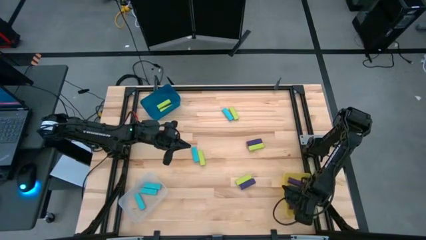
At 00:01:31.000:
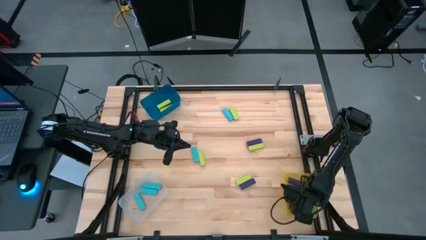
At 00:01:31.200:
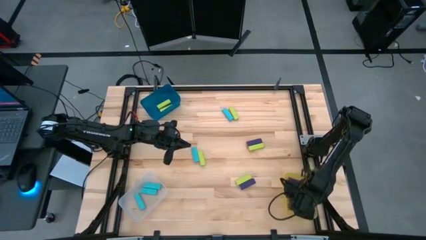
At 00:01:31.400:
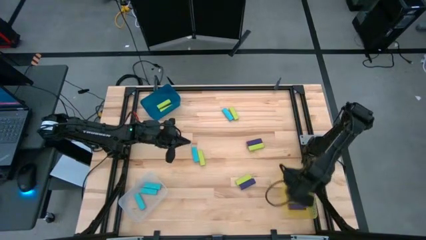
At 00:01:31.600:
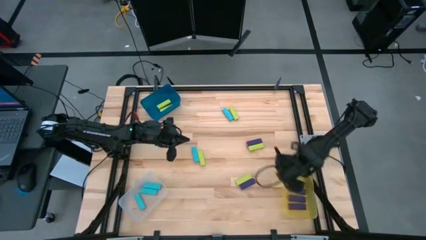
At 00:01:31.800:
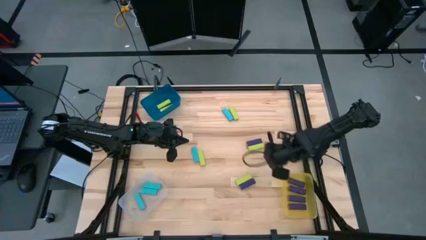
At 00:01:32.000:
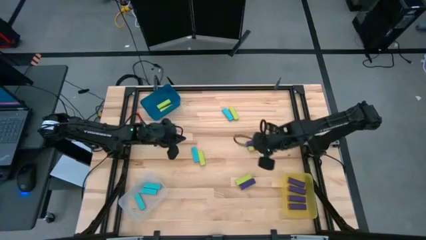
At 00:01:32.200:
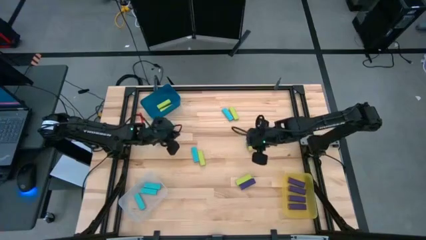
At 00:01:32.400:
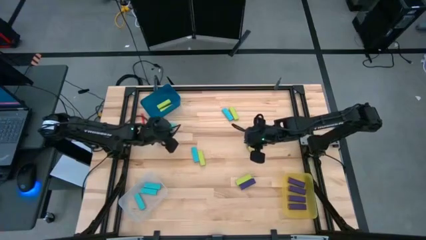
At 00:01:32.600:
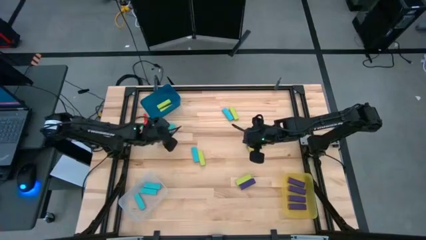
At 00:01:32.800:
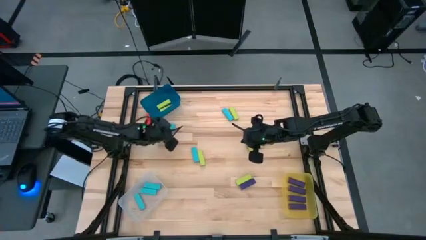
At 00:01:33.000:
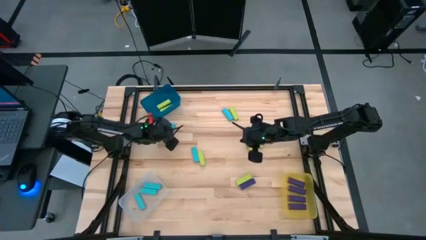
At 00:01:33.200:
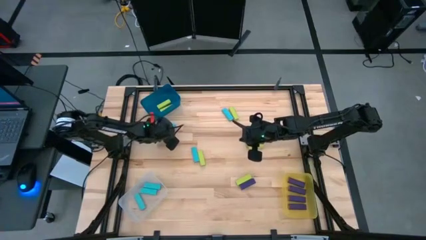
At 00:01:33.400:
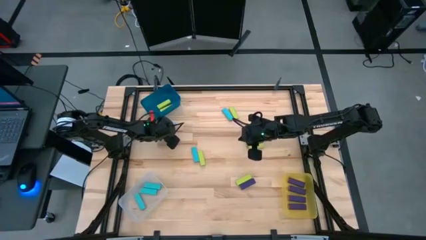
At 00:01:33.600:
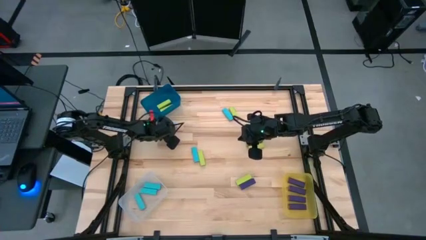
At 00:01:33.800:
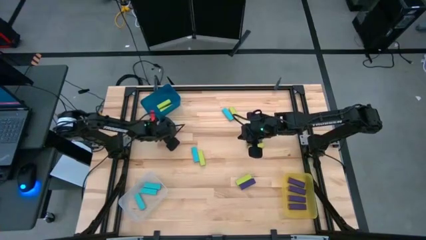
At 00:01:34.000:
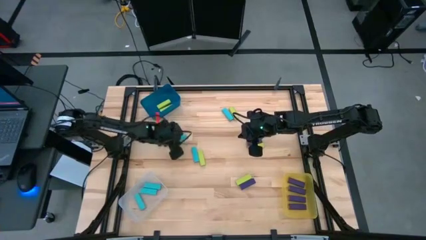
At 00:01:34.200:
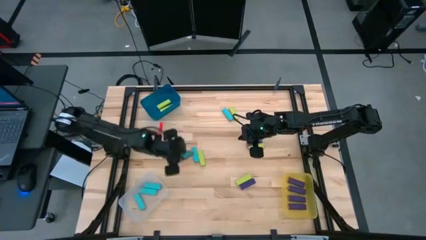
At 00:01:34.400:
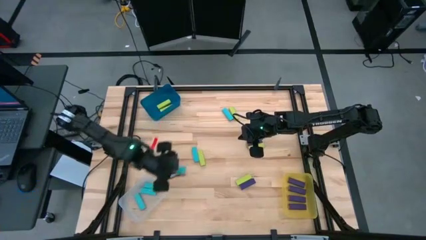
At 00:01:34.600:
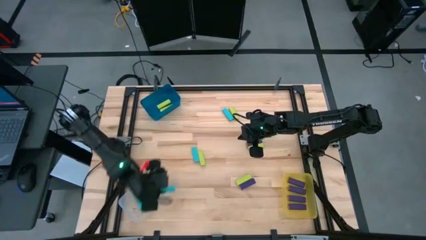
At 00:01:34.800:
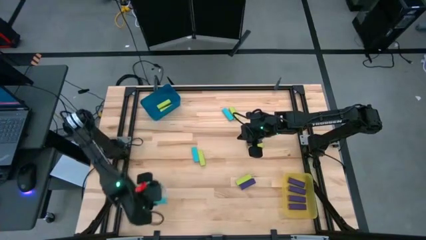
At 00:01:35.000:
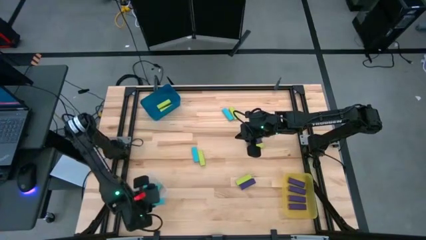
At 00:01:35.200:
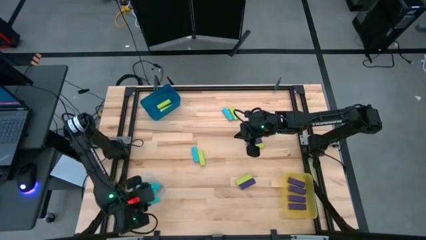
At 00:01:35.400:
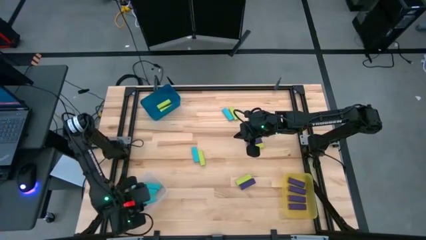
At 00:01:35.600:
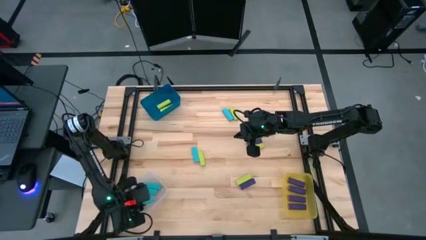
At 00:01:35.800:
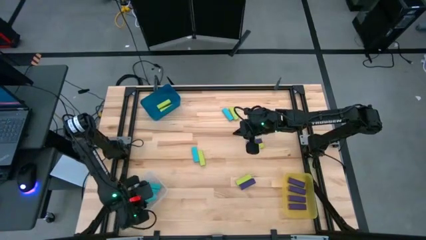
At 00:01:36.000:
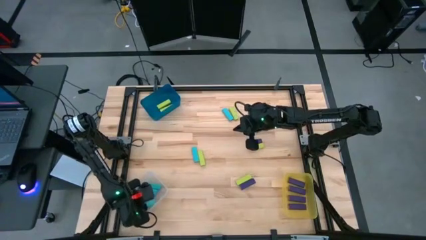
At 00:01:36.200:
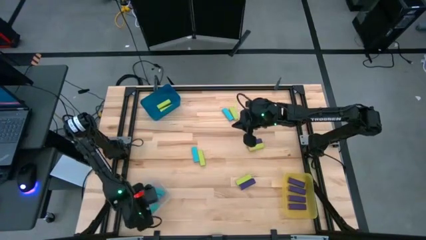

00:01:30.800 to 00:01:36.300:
Task: Sort blocks
Put the blue block into the transparent bin

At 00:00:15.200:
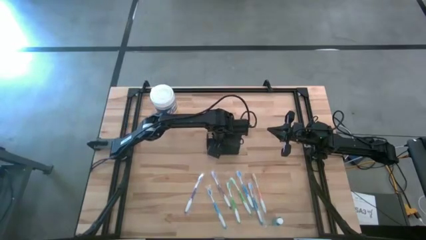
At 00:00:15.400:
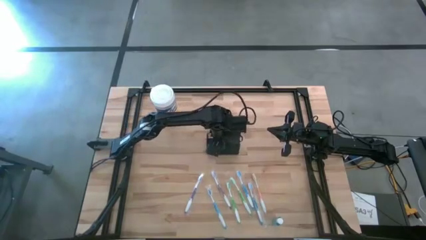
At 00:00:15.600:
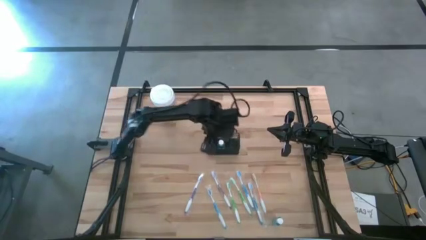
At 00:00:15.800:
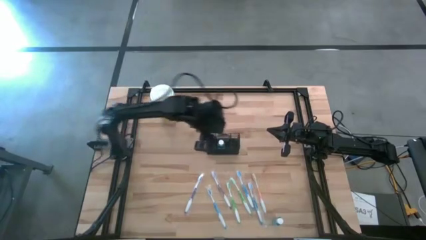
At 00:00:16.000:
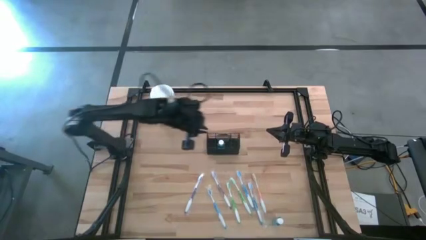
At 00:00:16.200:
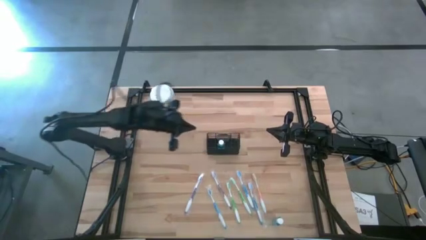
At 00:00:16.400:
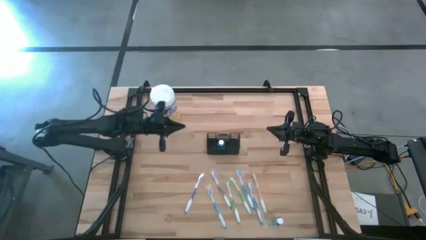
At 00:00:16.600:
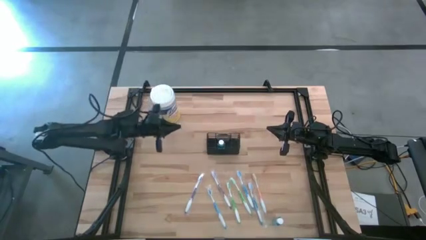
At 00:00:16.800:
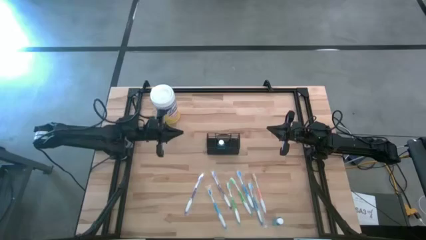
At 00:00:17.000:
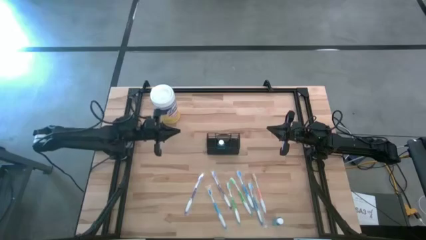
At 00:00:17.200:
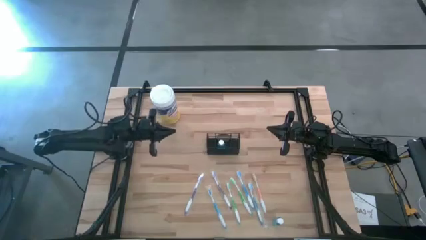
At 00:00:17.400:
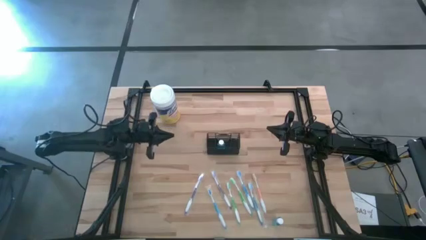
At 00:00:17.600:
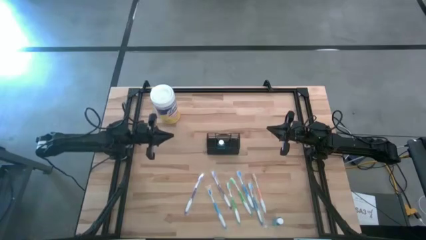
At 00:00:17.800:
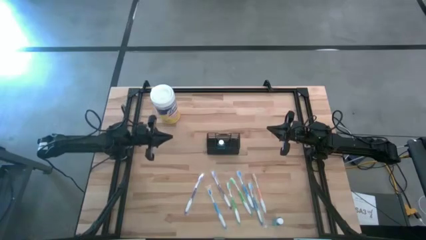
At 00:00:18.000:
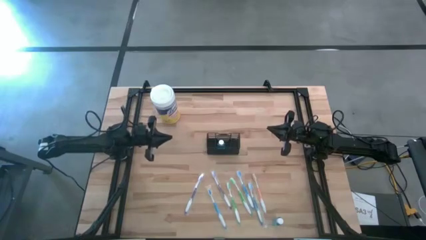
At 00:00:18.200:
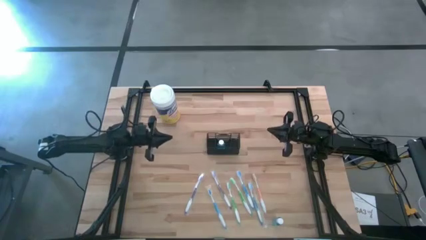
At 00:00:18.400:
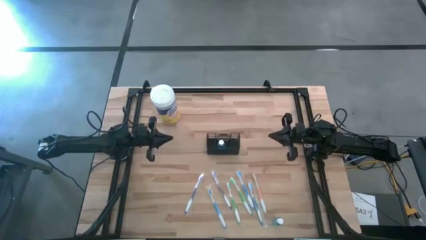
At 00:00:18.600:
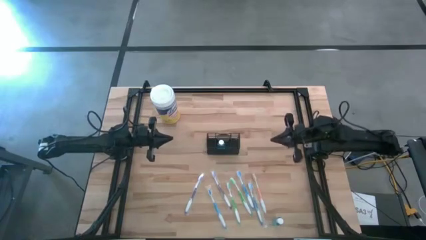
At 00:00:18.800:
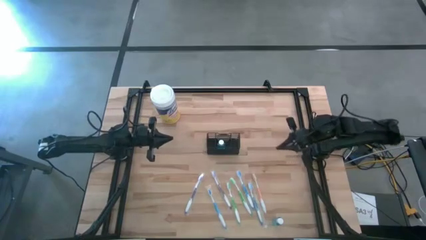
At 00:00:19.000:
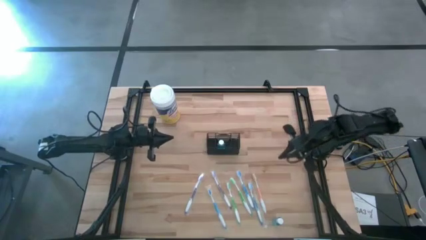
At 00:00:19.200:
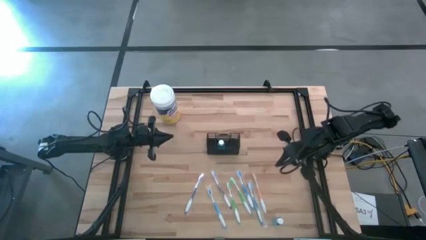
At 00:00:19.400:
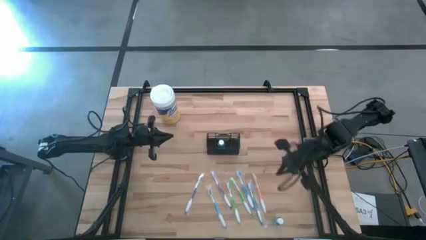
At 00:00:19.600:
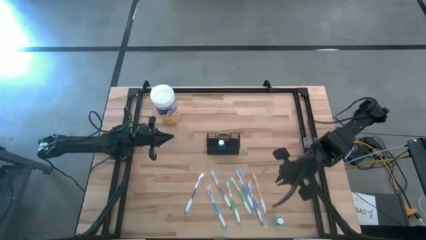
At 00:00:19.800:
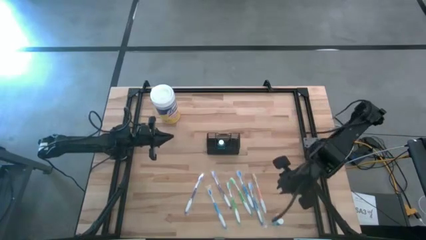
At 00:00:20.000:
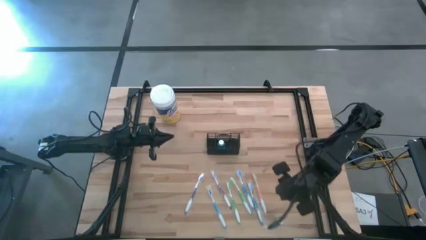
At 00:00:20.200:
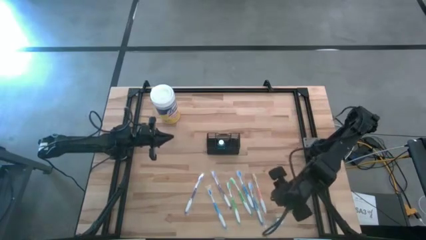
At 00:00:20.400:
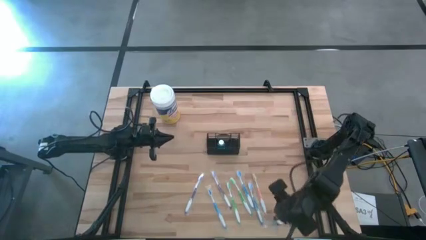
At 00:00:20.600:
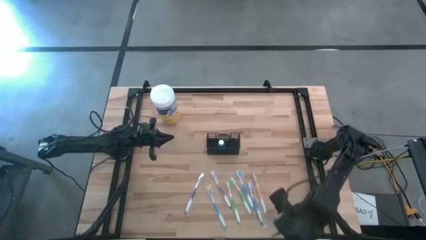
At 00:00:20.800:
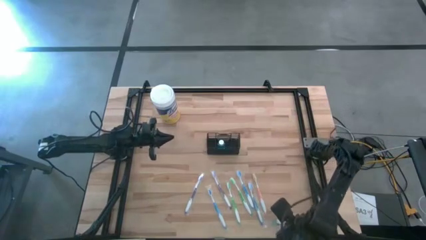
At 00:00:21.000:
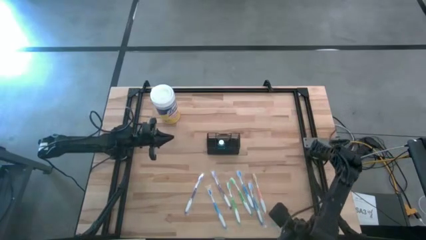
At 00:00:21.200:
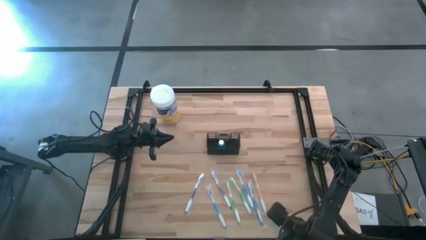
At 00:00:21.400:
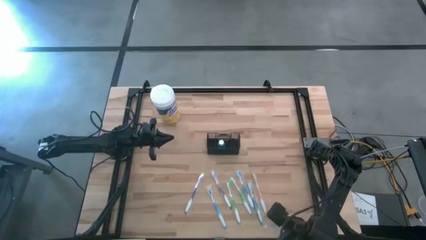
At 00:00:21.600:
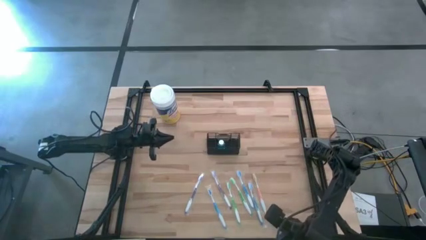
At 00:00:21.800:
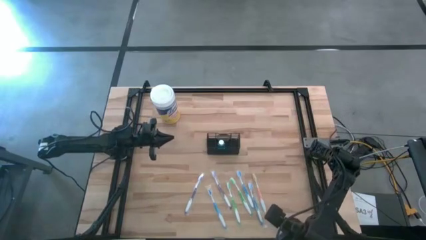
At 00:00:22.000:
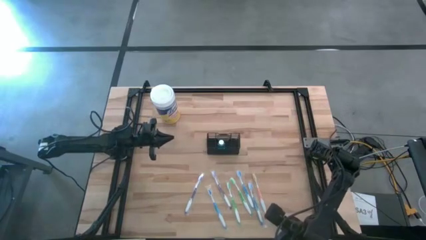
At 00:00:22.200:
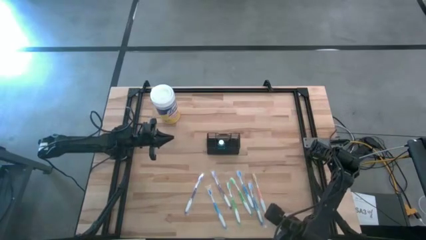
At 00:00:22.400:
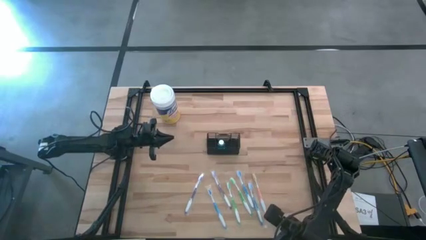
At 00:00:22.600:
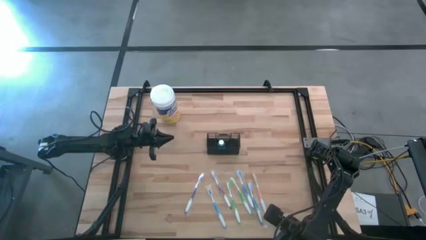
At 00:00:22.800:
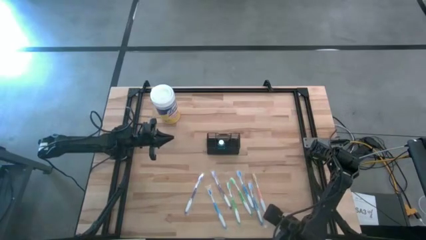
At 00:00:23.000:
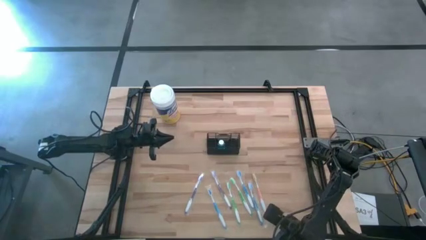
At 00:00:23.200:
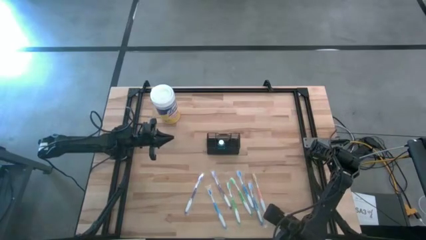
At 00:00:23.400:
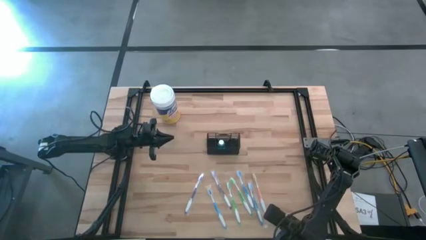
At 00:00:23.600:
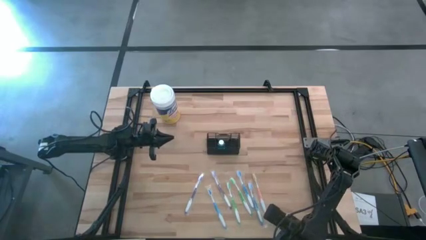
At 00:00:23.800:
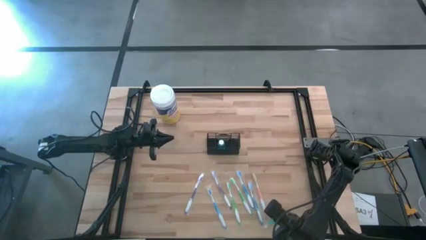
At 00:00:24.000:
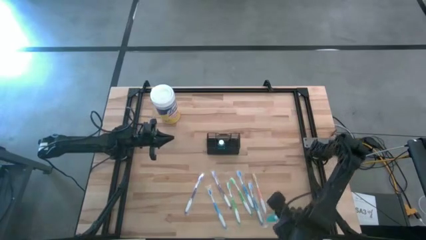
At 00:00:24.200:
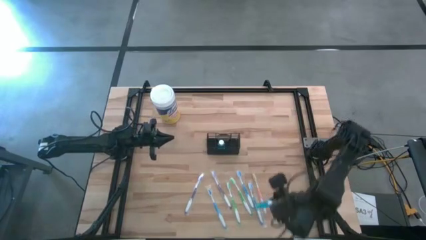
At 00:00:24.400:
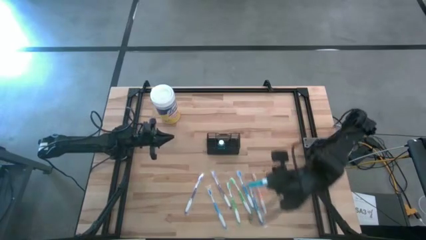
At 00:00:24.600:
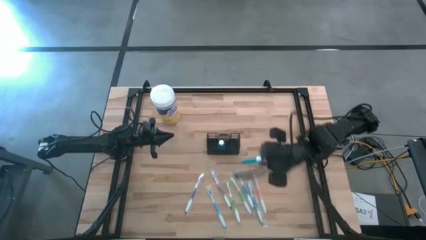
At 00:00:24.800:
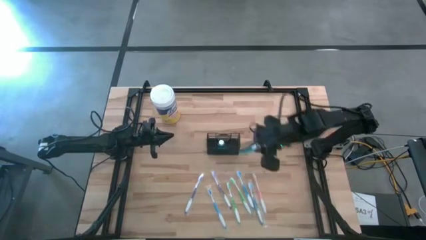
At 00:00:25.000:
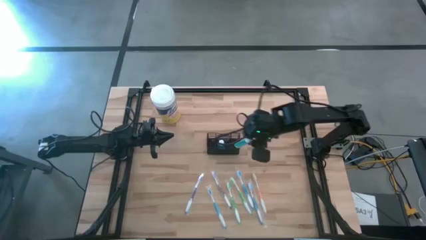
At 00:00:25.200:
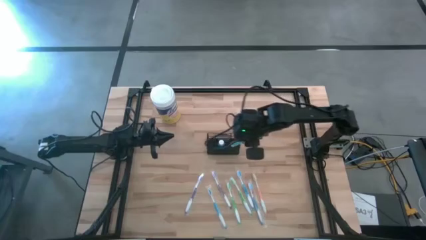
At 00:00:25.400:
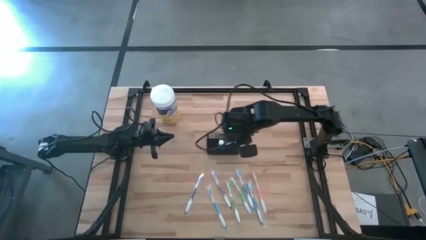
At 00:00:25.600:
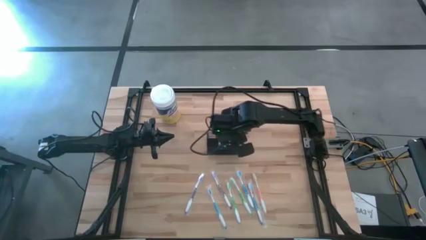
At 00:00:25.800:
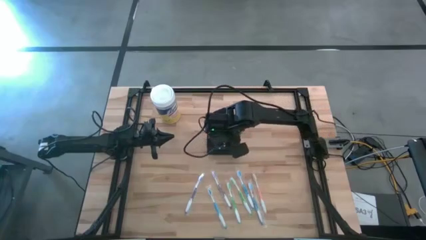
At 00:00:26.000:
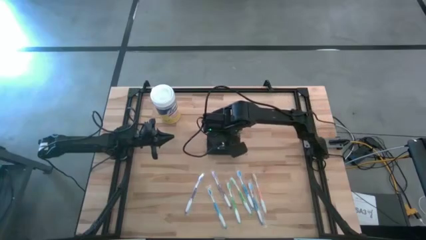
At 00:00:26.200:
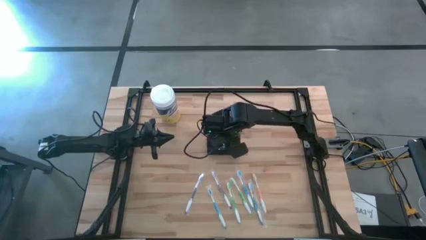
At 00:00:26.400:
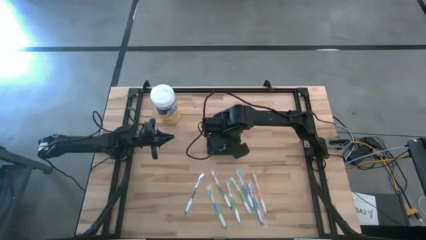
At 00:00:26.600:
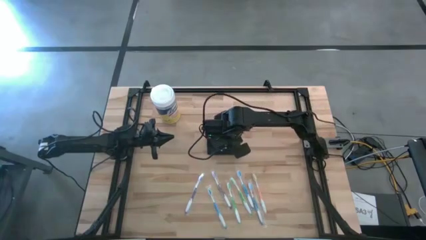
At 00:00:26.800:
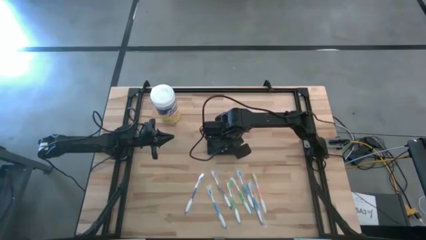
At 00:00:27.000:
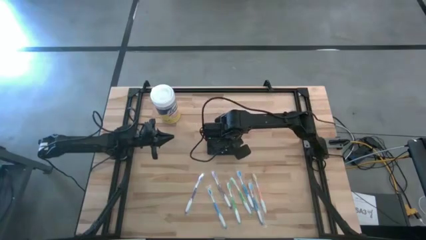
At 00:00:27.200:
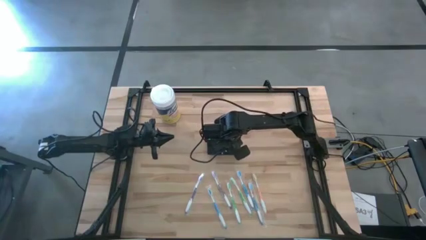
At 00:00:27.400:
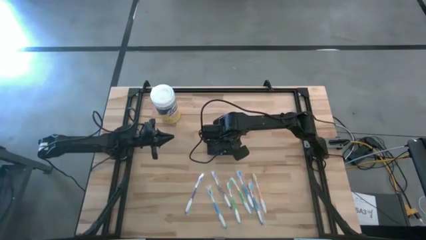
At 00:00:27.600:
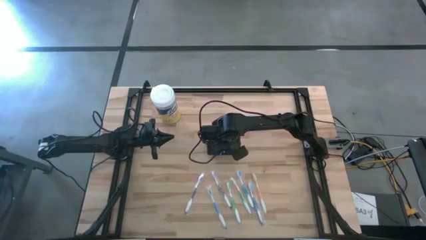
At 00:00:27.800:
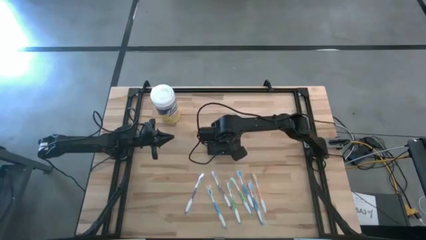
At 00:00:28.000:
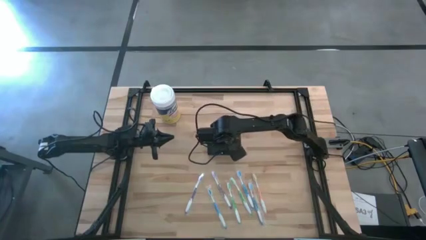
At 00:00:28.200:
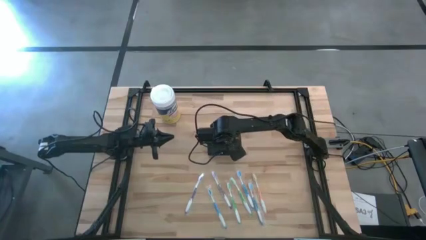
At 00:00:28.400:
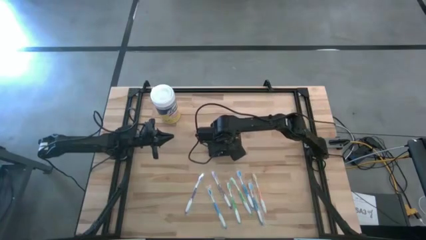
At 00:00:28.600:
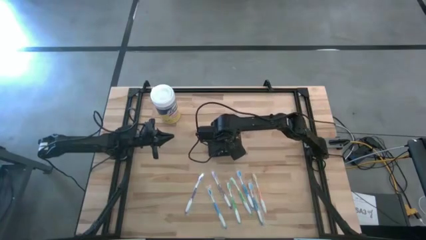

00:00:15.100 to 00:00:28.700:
Task: Pick & Place toothbrushing station
Put the blue mouthwash into the wire organizer
